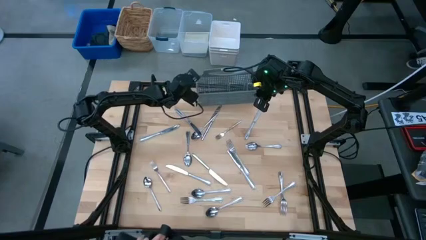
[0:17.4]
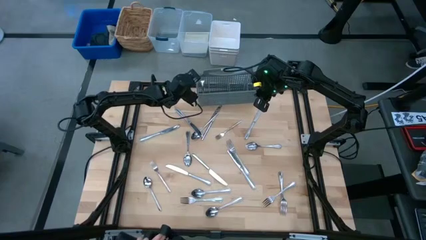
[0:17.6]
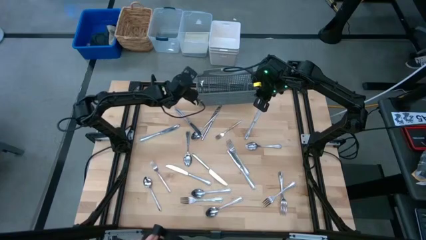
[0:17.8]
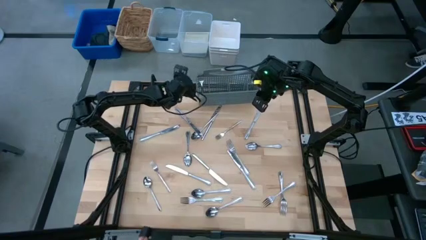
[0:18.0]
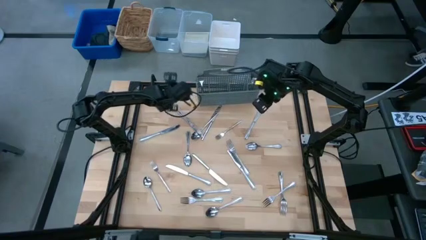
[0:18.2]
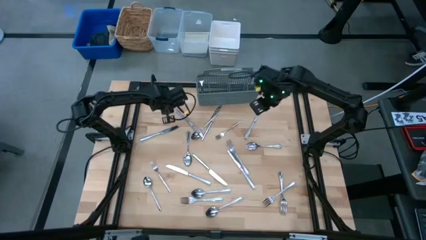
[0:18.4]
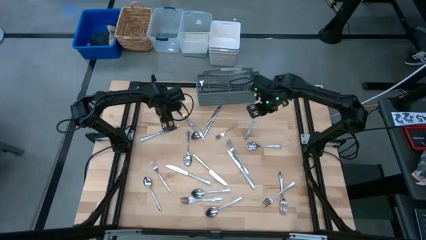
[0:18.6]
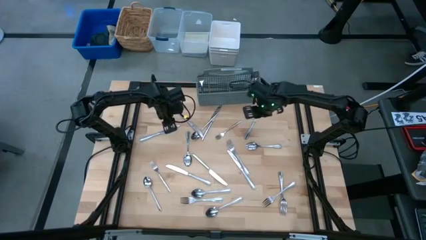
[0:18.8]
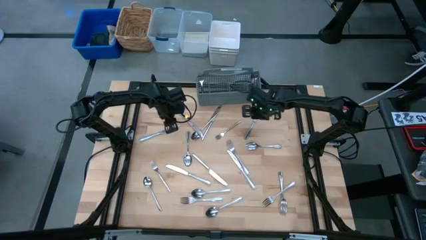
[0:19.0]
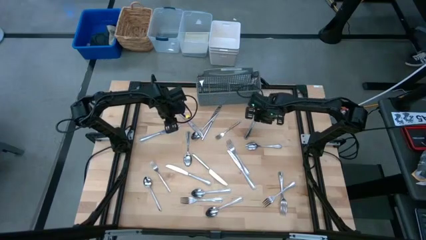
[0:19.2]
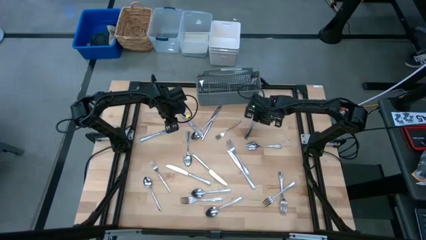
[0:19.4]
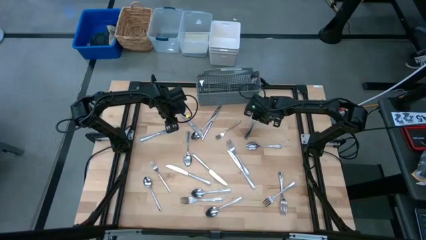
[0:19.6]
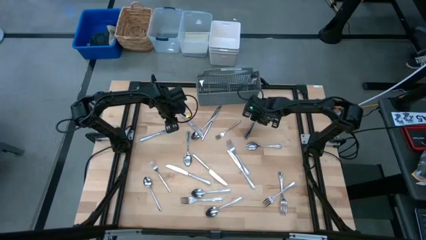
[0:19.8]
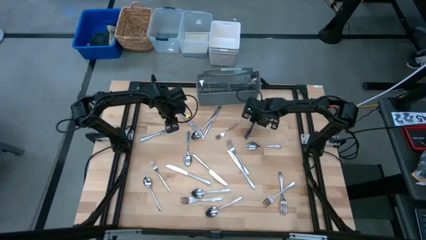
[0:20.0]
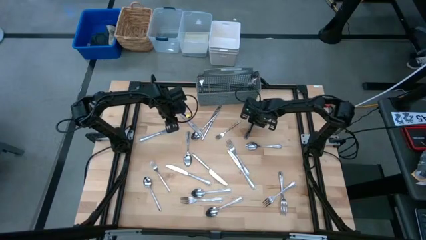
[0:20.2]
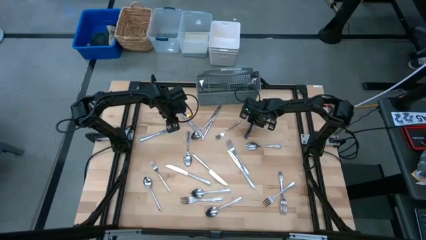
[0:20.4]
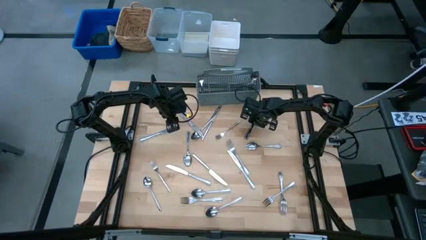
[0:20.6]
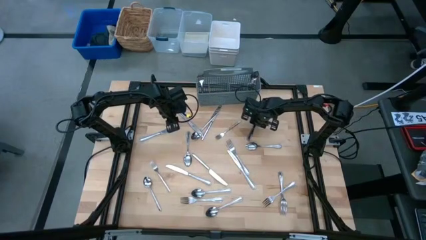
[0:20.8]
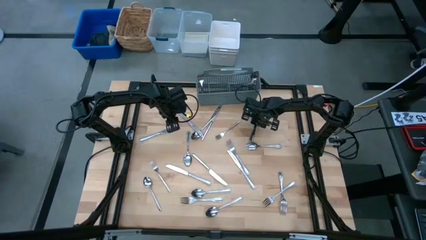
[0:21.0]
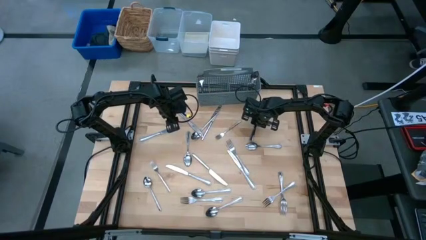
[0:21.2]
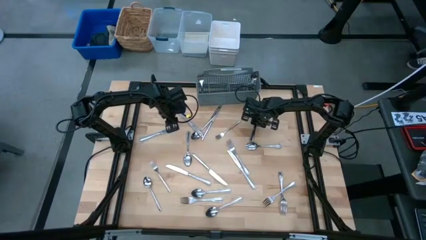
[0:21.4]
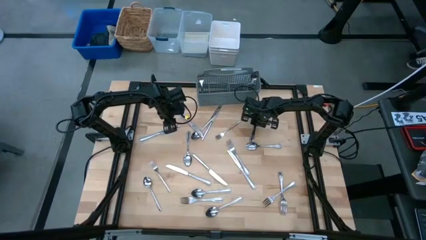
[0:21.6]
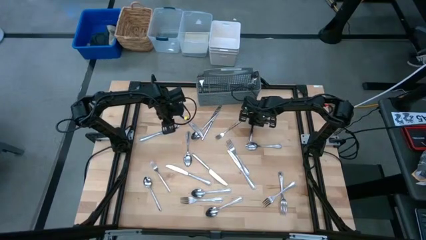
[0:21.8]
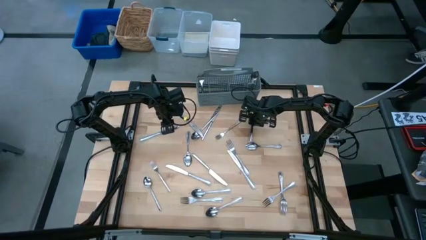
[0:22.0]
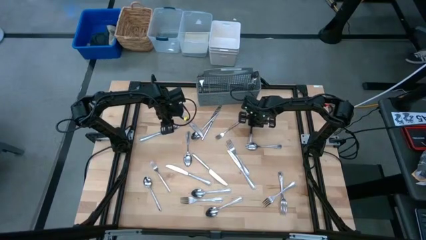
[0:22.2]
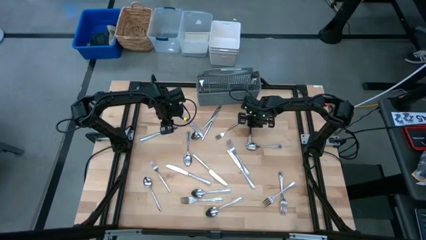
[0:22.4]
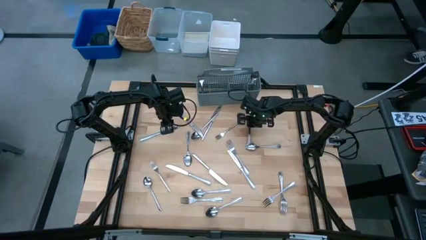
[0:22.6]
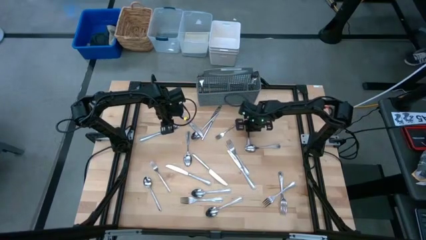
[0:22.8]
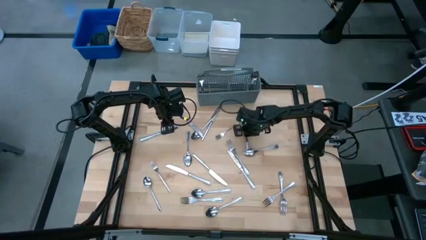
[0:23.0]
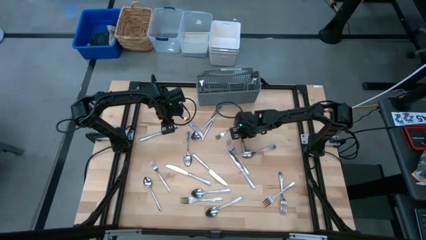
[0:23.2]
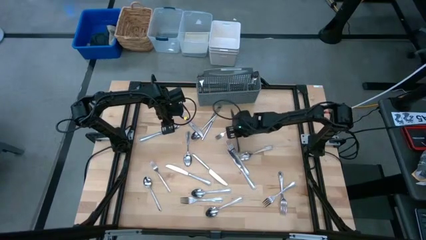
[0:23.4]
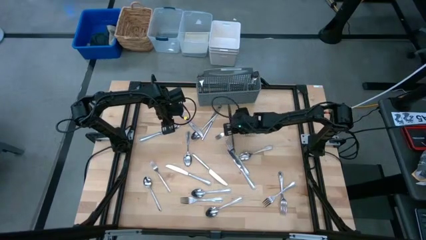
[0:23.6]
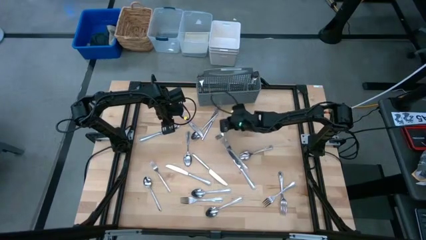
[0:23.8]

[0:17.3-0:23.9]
Put the silver knife into the dishwasher utensil holder

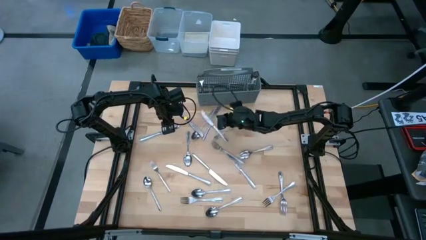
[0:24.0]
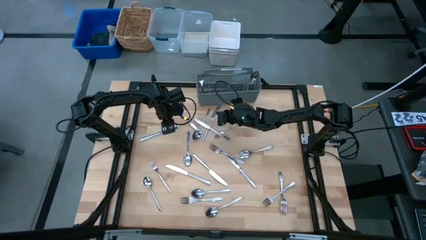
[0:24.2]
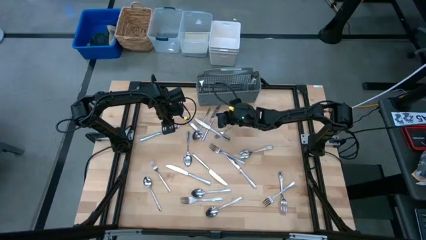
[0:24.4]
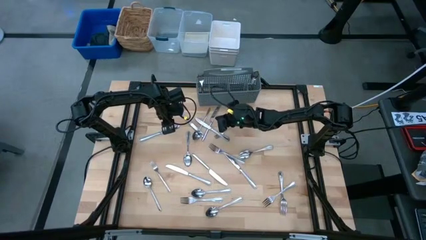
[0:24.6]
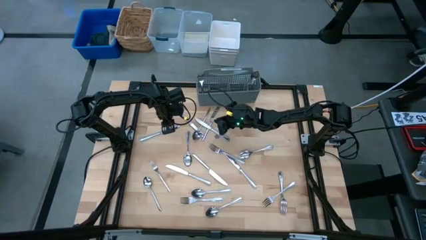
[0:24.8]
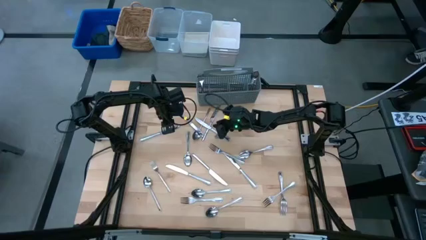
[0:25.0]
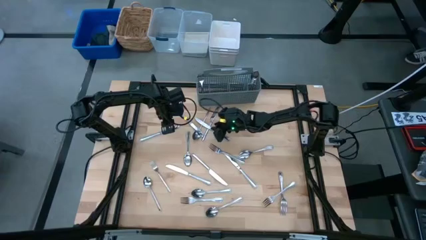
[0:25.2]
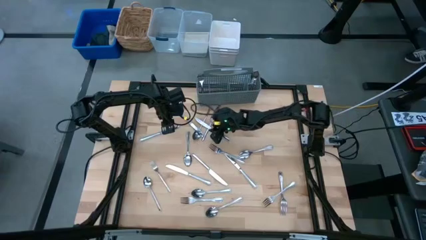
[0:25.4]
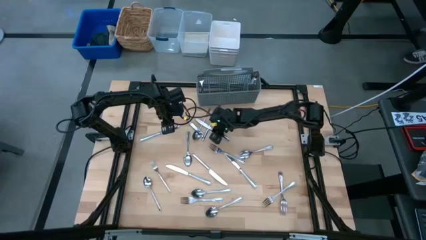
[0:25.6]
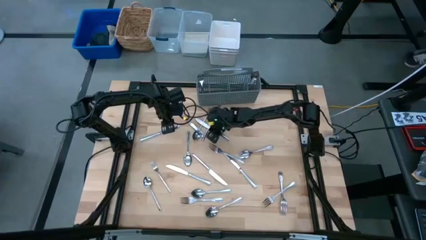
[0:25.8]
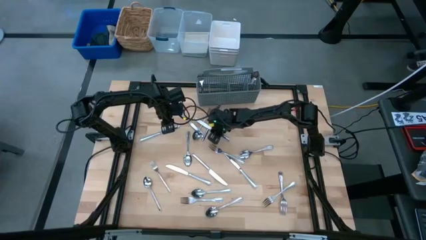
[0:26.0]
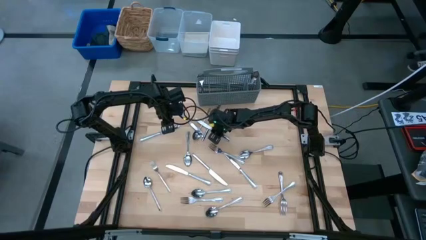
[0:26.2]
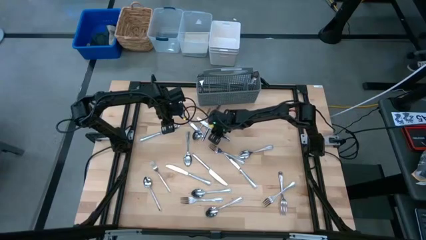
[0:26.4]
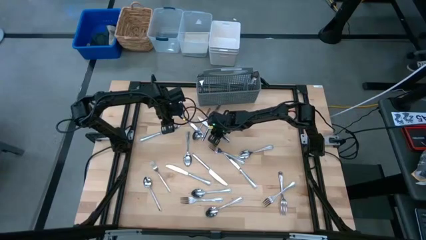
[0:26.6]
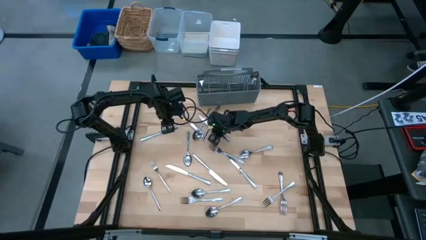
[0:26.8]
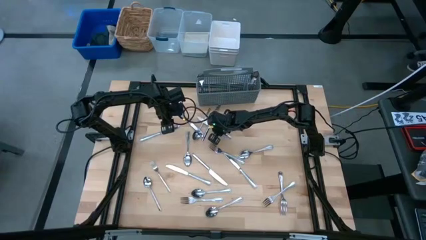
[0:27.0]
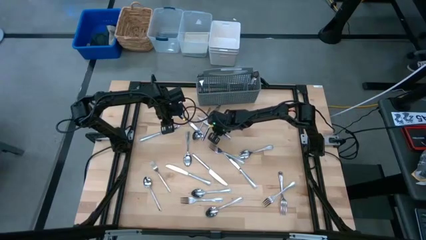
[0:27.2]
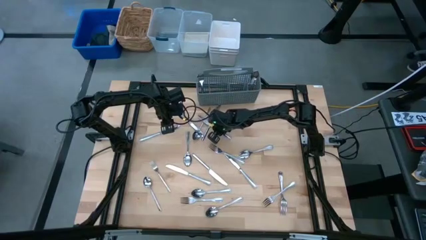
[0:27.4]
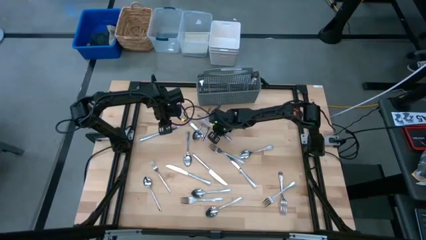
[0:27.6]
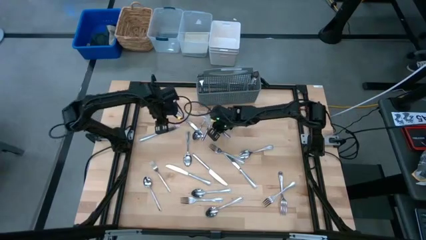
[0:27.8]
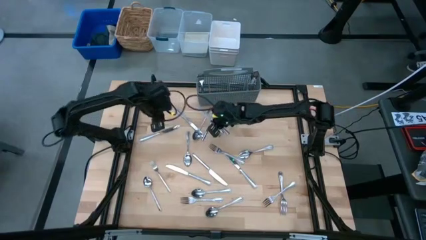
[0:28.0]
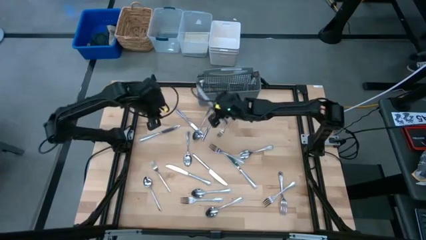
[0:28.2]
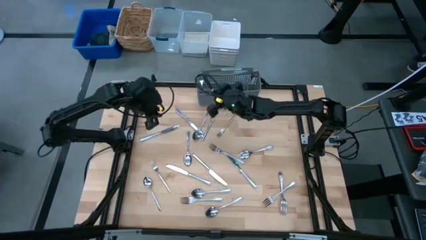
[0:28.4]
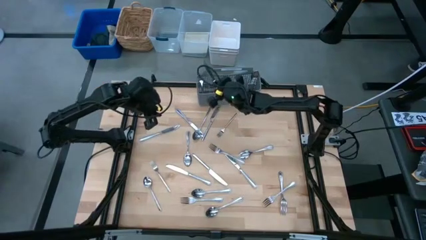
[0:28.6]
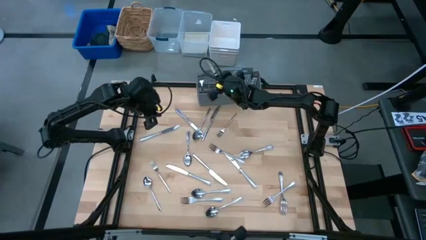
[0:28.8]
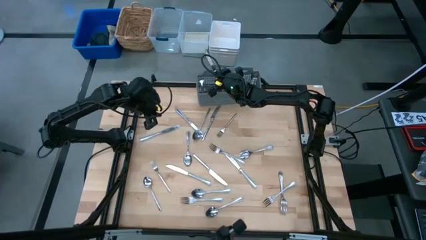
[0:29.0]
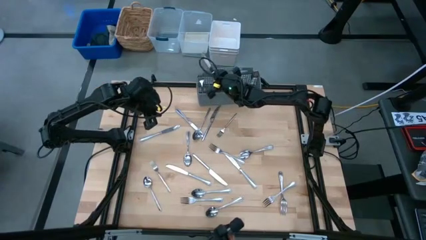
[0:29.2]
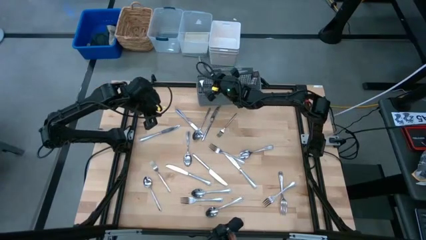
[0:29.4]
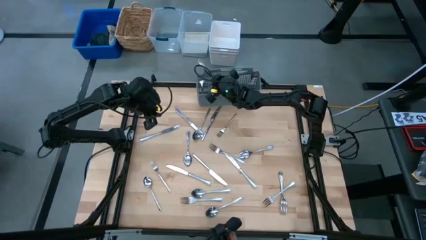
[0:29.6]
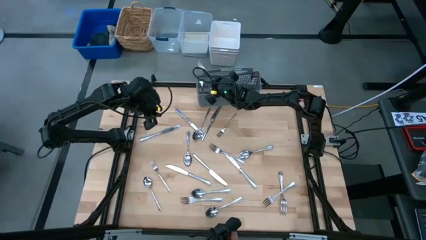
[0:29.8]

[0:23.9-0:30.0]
Put the silver knife into the dishwasher utensil holder
